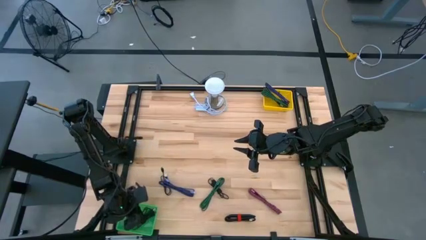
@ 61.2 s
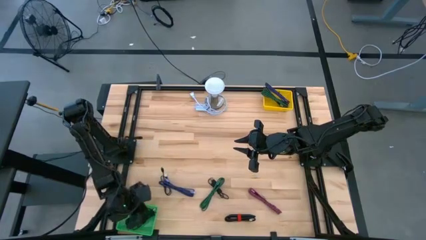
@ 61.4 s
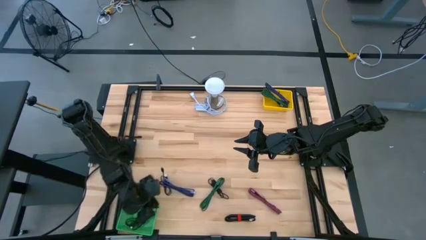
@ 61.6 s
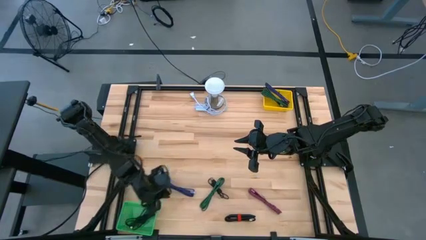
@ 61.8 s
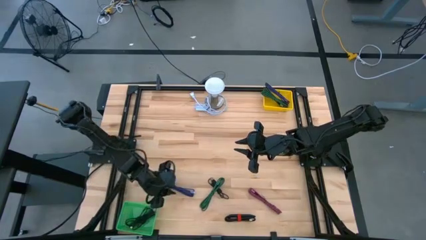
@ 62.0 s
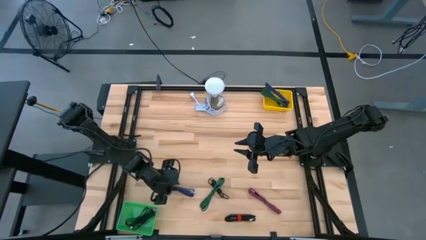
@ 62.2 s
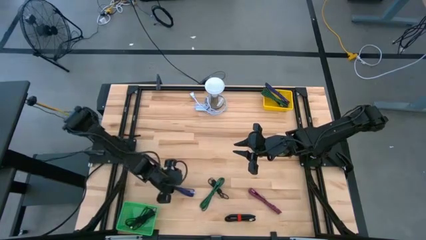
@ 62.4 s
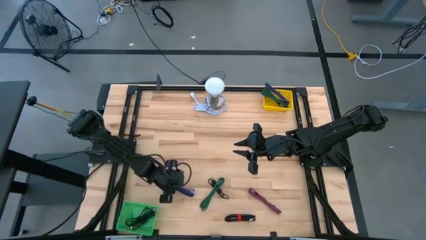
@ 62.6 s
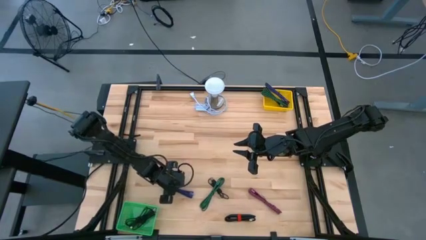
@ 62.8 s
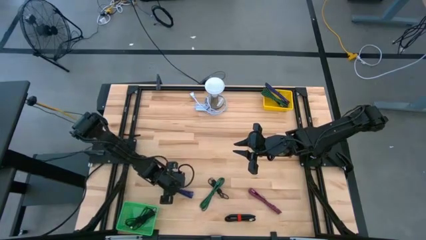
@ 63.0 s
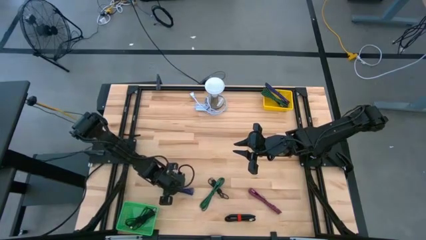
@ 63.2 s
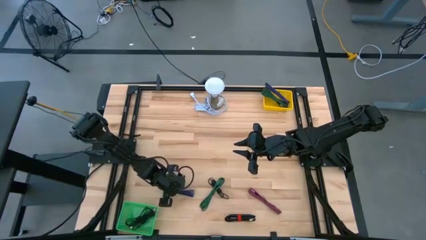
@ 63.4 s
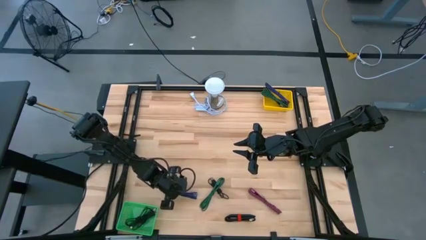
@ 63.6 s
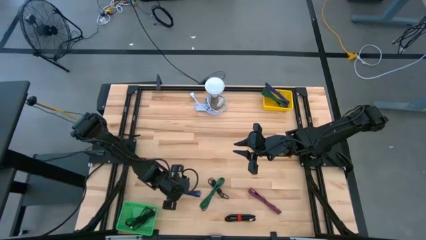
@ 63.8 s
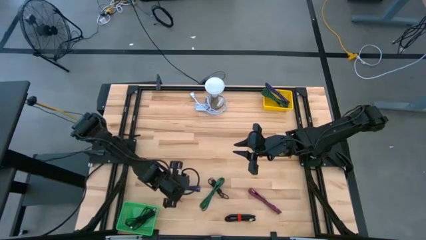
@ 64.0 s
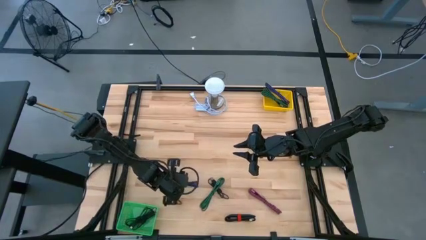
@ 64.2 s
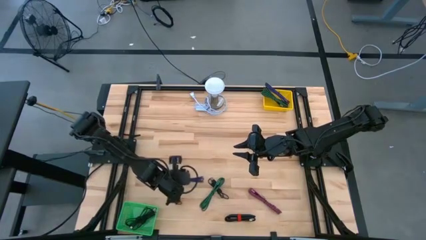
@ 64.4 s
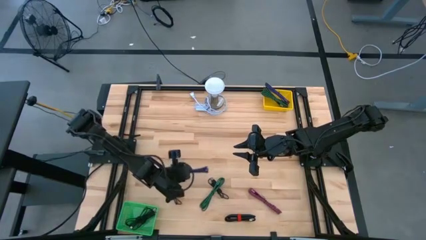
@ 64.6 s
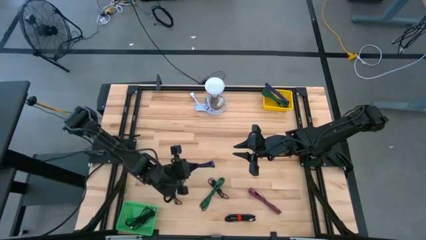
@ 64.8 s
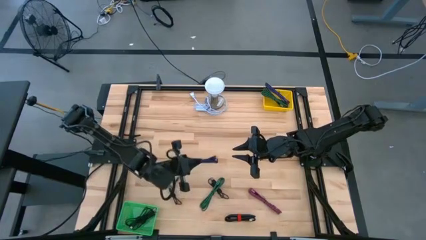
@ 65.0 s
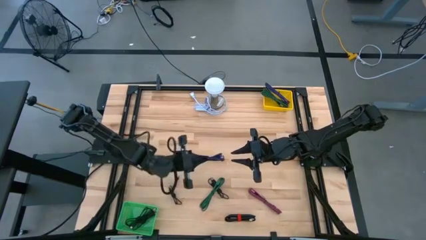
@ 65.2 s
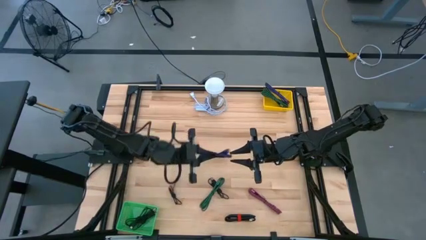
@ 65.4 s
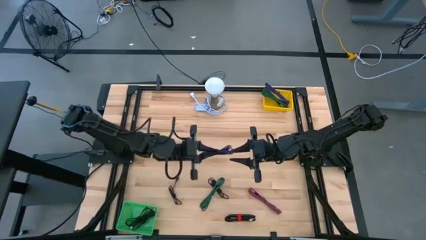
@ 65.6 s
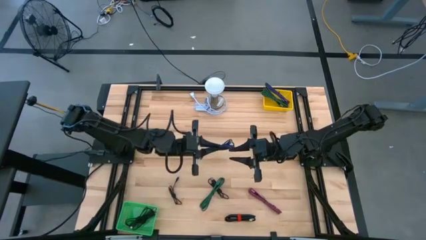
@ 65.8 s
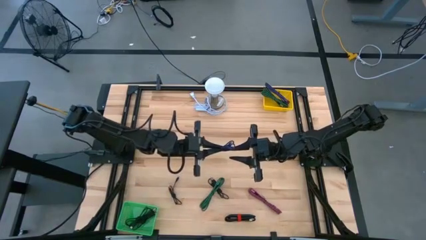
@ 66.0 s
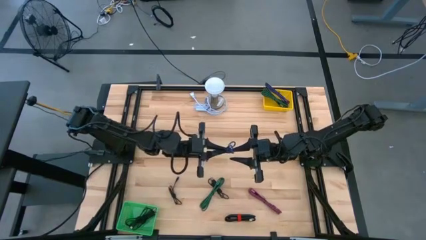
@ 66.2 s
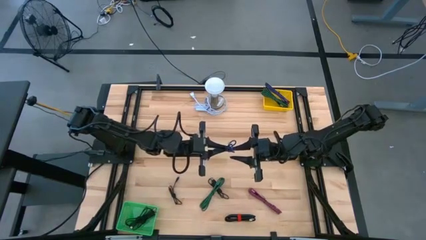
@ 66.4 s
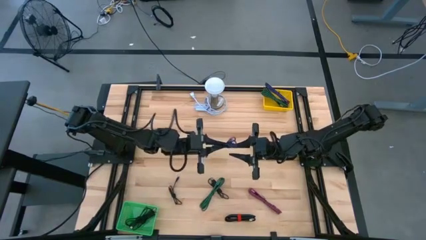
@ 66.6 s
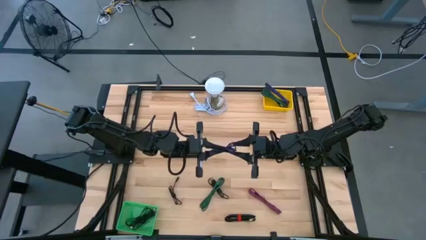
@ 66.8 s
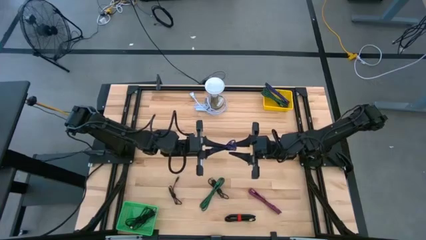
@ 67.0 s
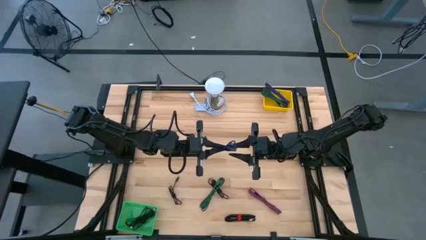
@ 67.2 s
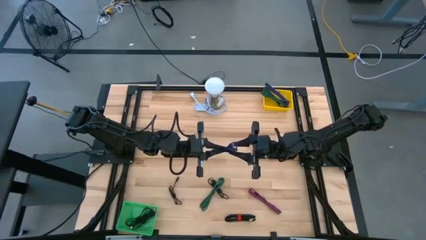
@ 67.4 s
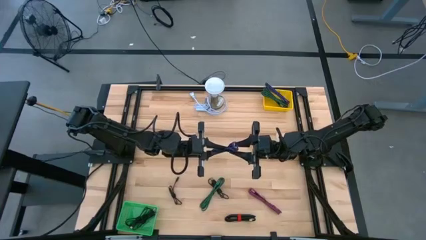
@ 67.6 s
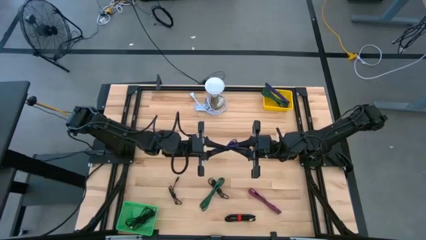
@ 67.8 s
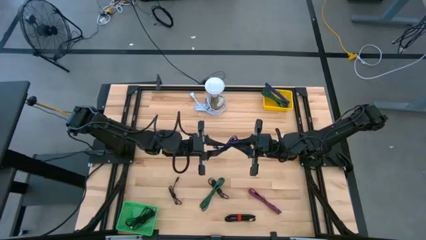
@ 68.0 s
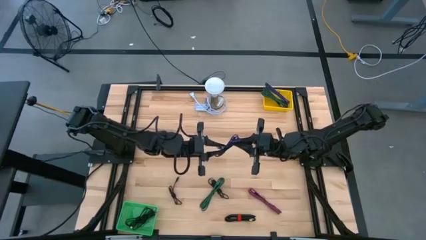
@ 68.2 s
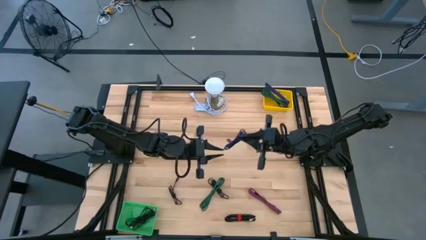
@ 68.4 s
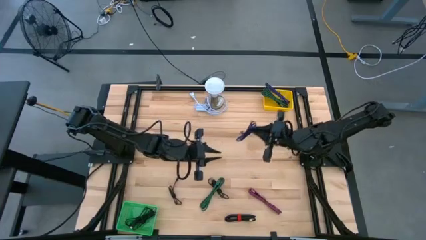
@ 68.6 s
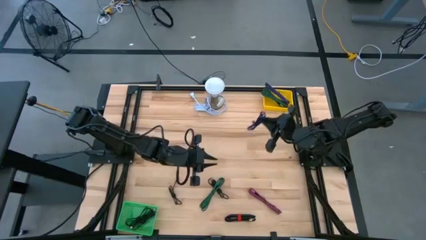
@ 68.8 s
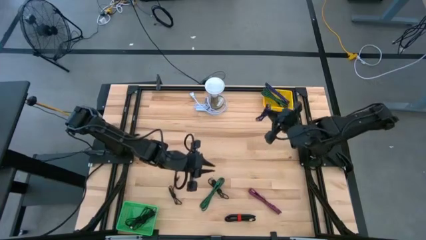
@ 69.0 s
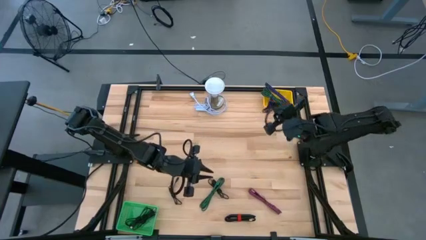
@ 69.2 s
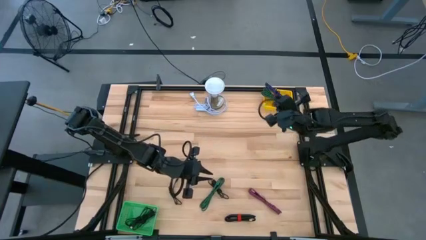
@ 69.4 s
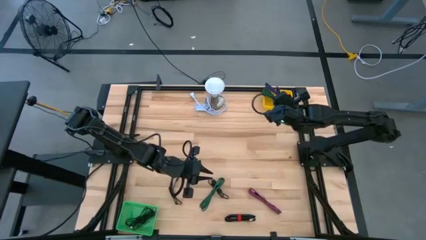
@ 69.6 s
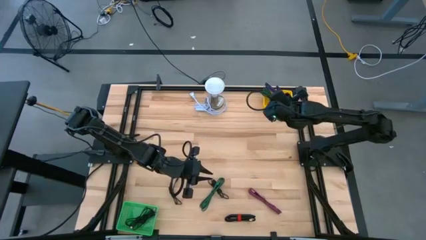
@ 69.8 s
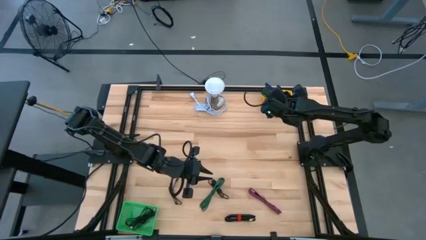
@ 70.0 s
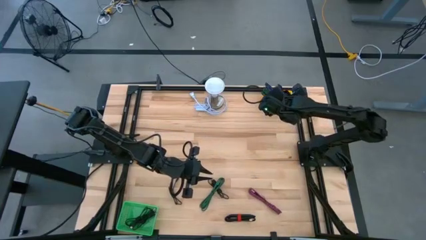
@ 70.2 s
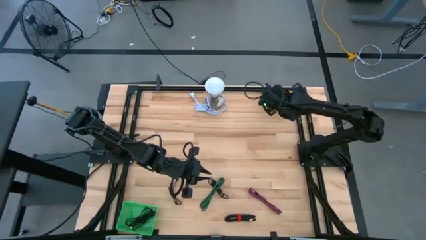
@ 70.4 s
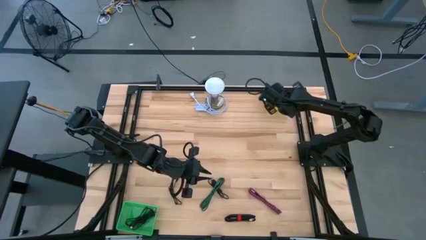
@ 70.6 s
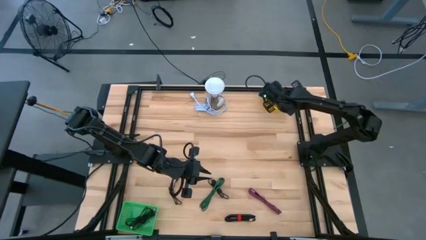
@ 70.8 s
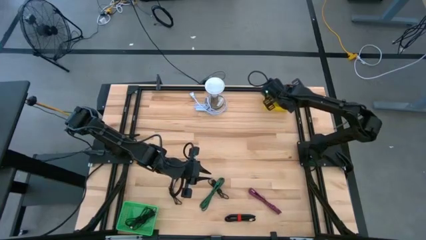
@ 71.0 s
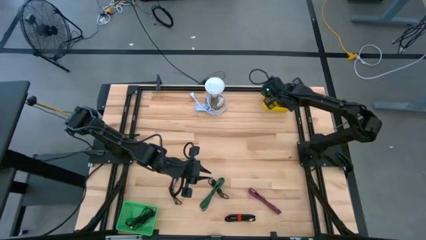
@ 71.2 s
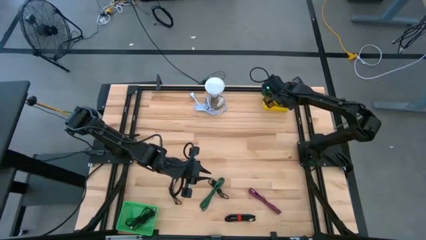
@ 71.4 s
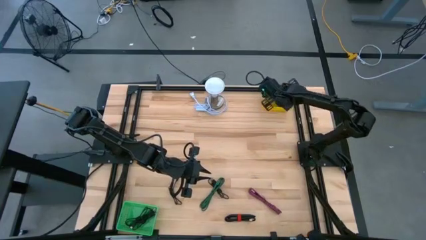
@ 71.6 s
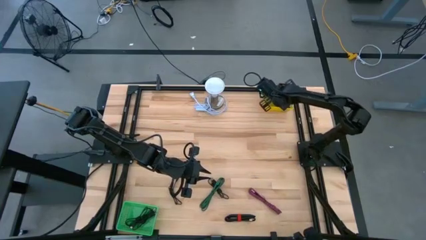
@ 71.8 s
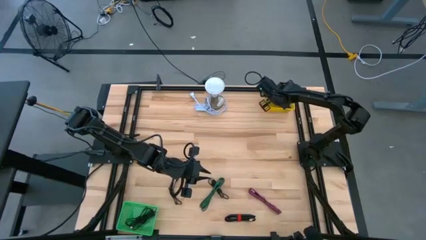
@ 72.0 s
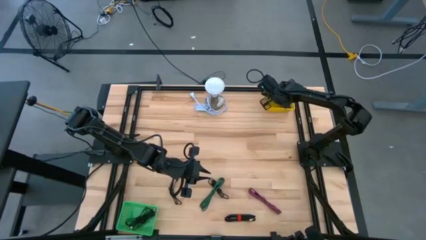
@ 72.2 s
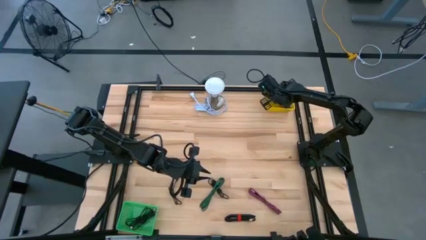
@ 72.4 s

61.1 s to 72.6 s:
Task: Pick & Place USB Port
Put the purple USB cable into the yellow bin
